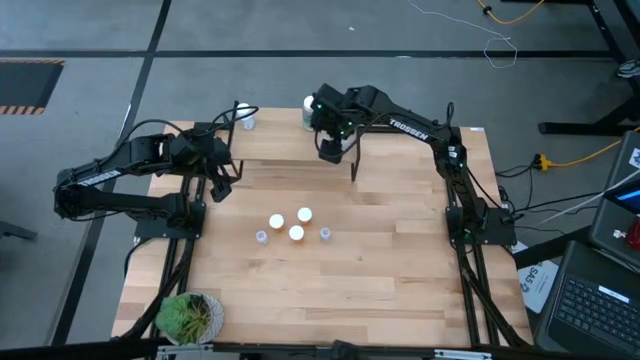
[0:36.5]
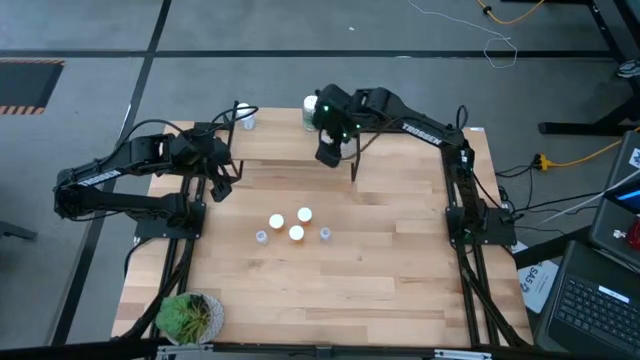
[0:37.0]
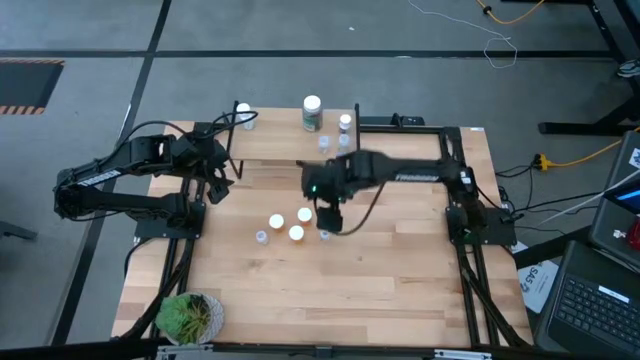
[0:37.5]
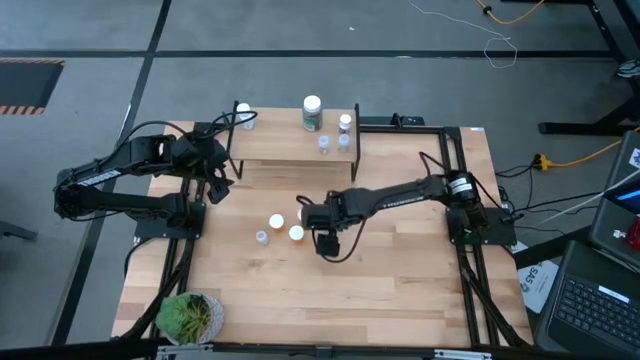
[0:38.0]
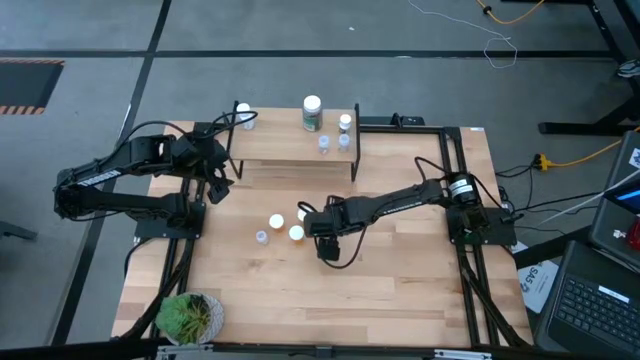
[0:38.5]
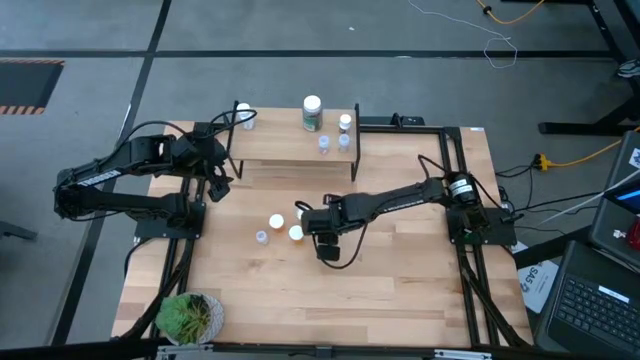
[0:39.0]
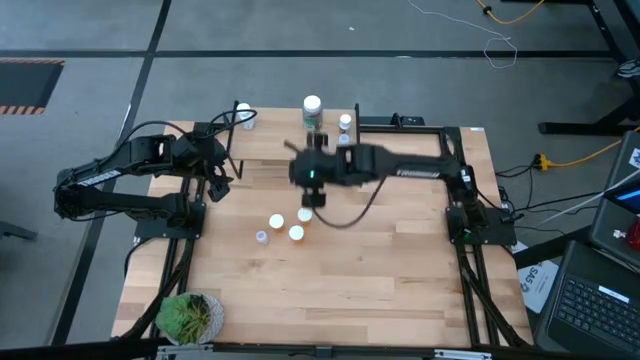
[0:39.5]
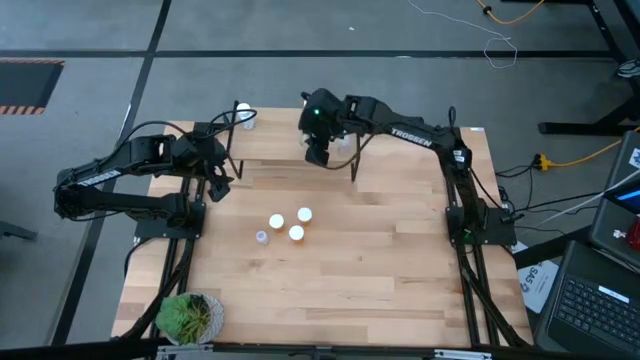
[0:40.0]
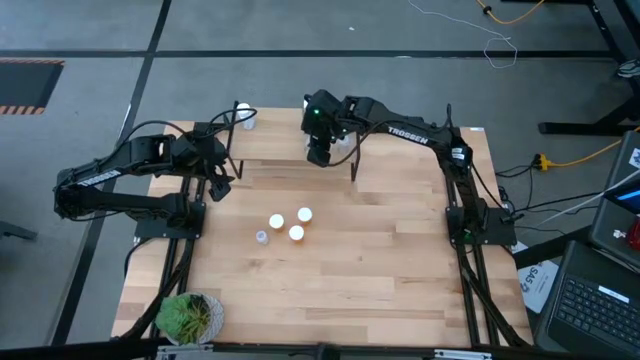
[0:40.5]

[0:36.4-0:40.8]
Task: Pick and place medicine bottles onto shelf by color
Put the transparent pill bottle on the shelf

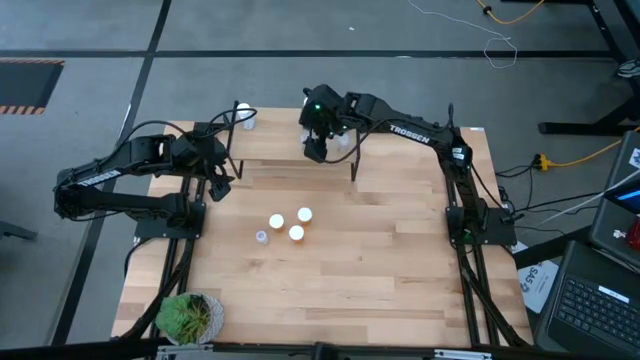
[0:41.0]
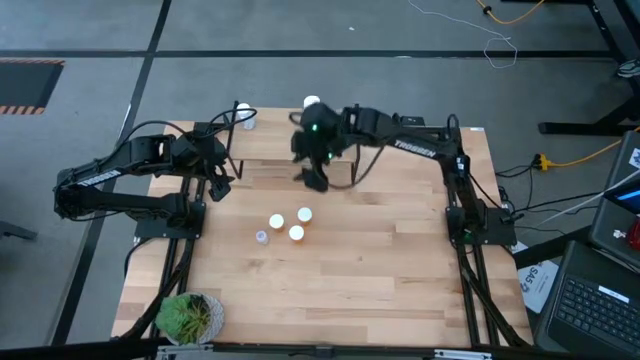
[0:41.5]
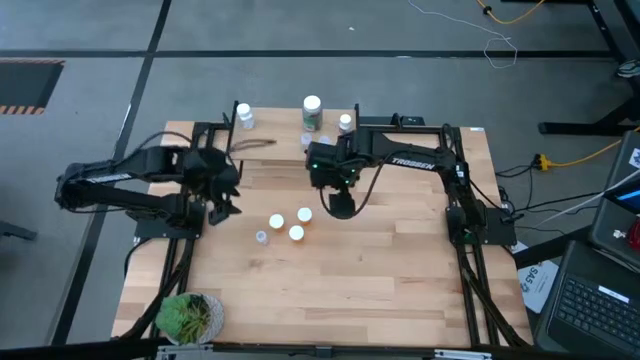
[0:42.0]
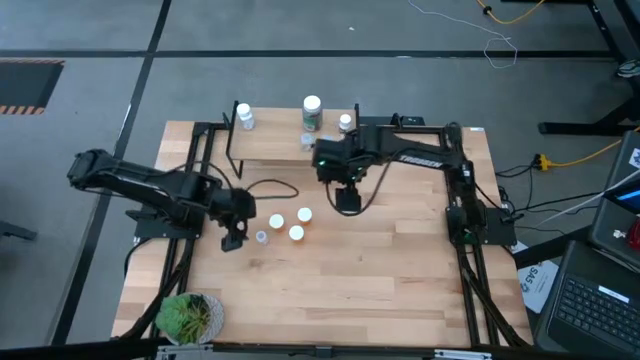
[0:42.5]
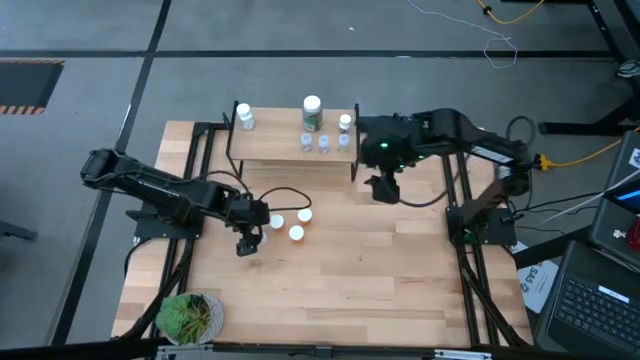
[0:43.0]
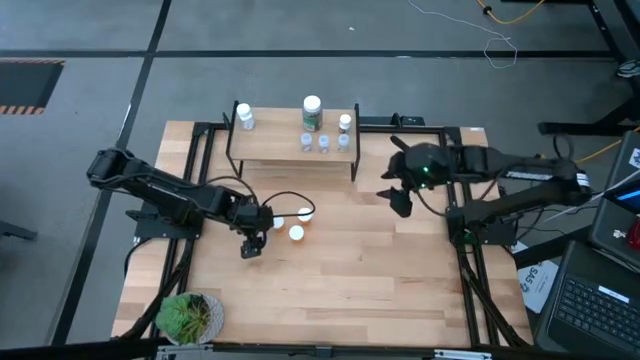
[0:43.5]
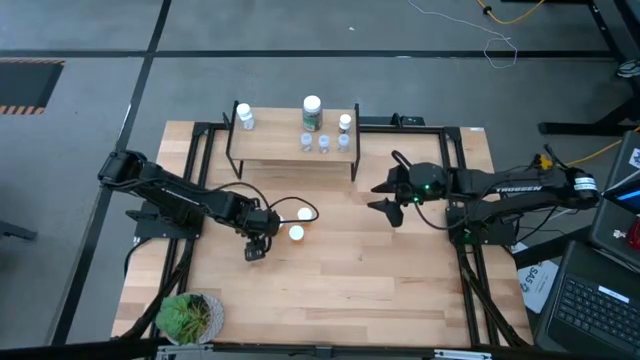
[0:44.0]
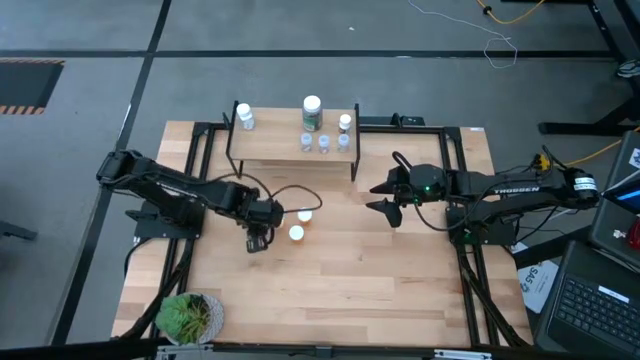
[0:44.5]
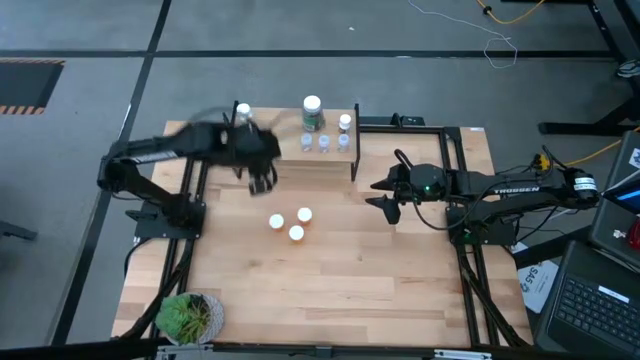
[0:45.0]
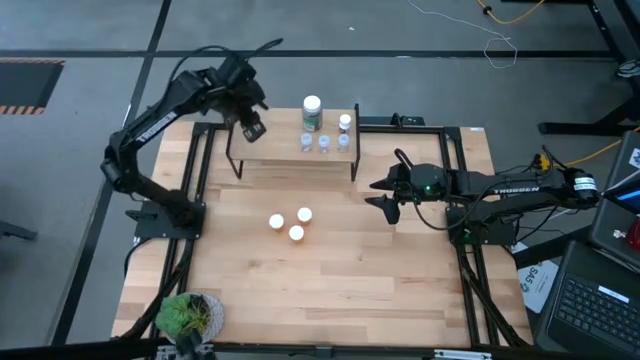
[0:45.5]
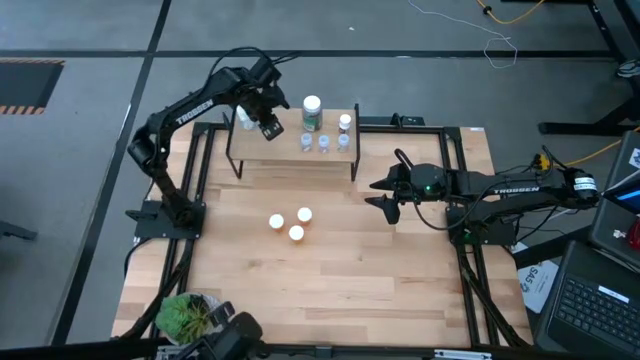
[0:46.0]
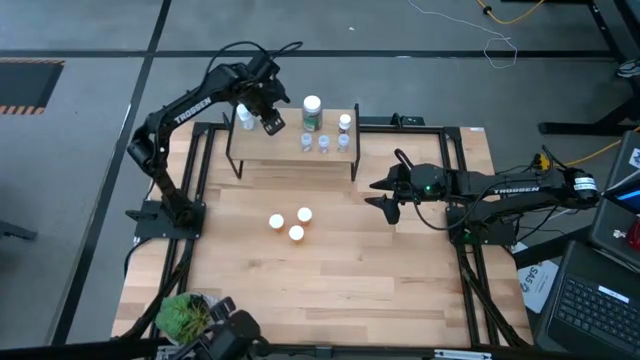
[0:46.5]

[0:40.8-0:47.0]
Put the transparent pill bottle on the shelf

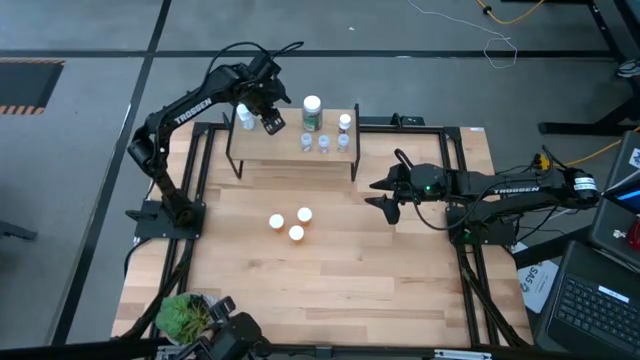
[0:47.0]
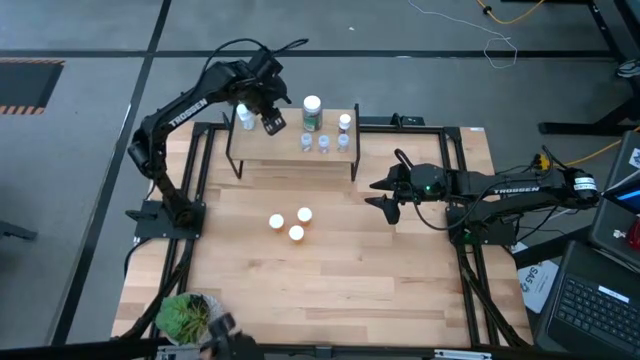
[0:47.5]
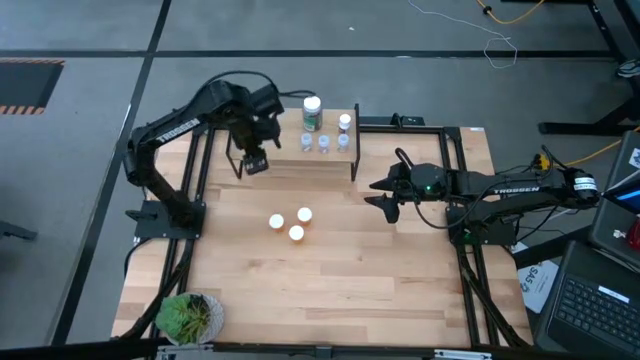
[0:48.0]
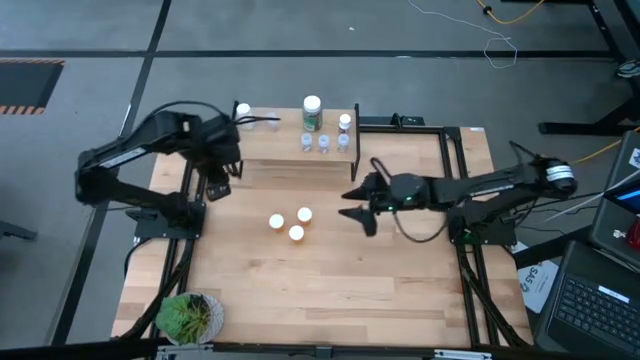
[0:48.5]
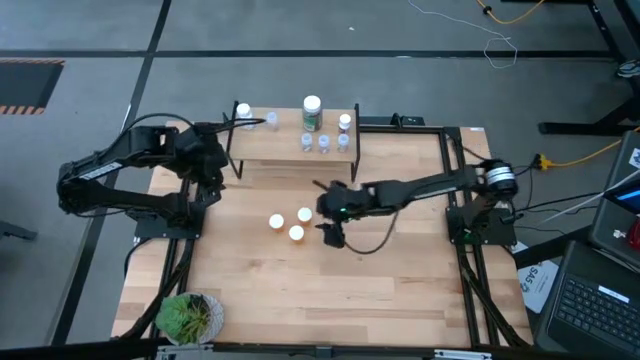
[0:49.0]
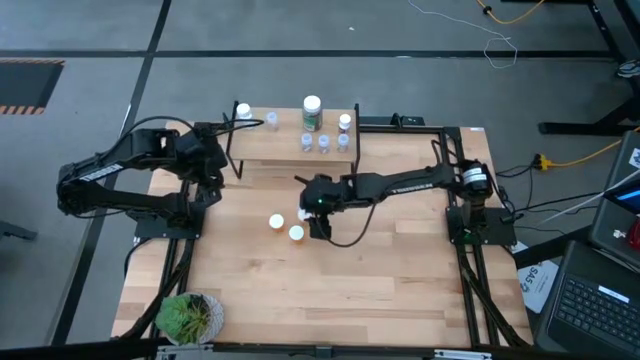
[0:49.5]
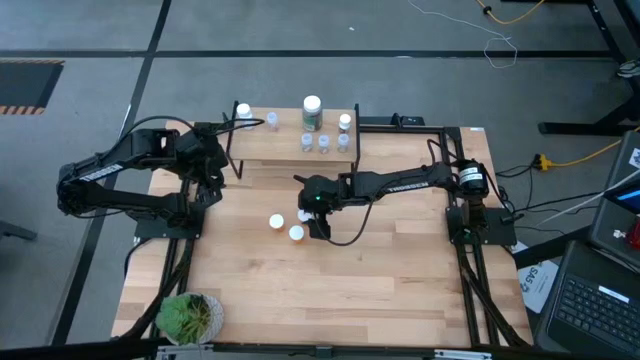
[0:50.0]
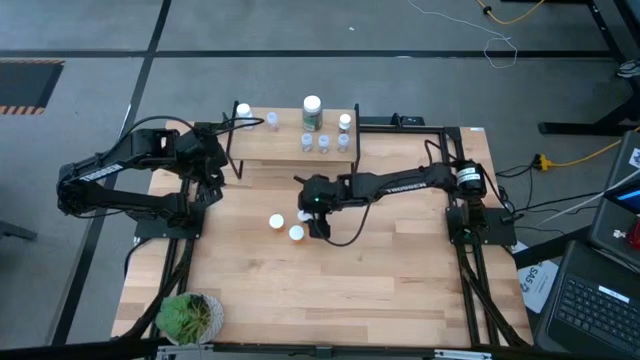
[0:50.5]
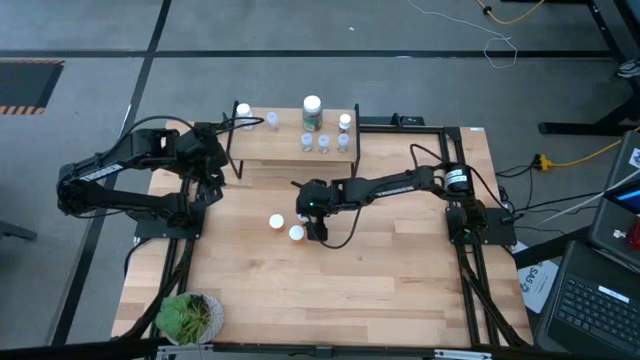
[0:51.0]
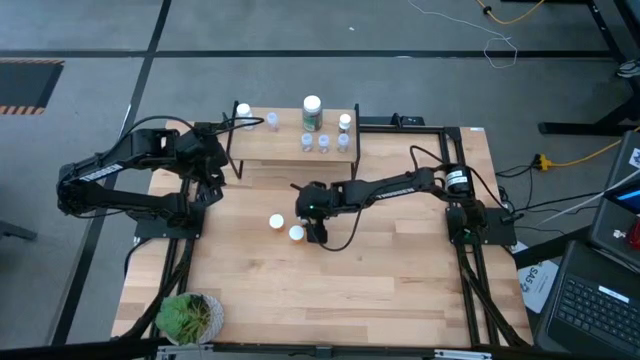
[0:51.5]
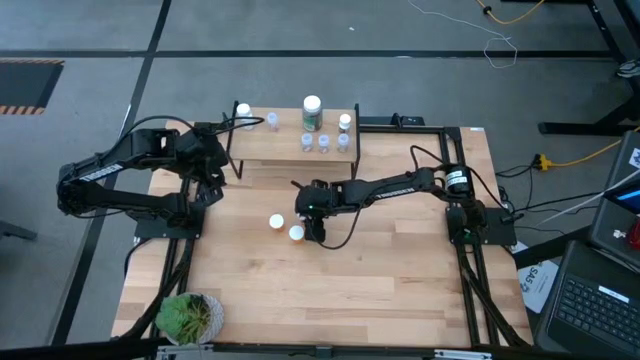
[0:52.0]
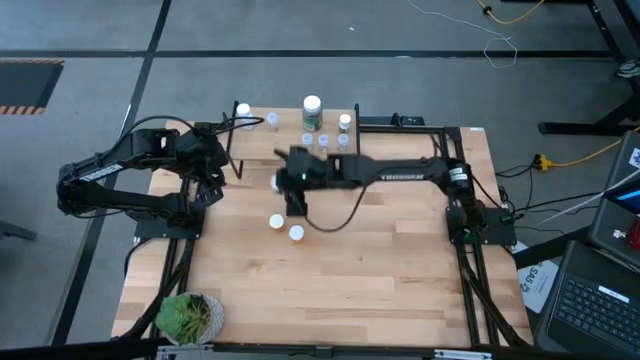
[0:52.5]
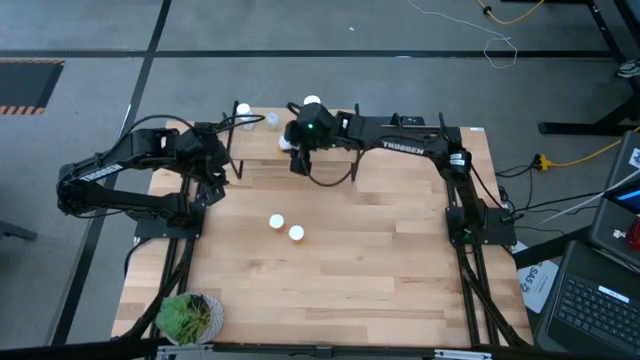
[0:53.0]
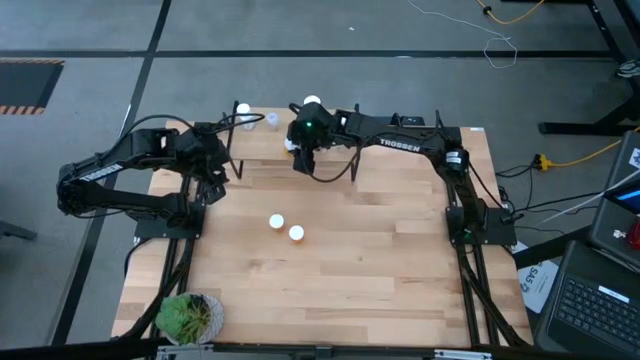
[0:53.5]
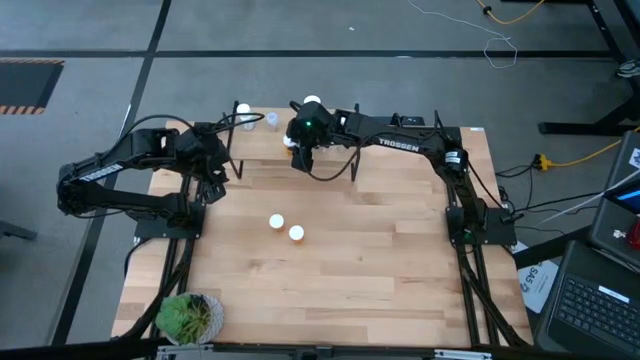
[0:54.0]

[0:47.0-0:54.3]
Put the orange pill bottle on the shelf

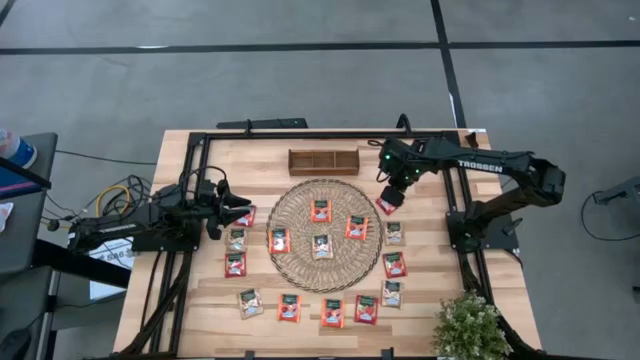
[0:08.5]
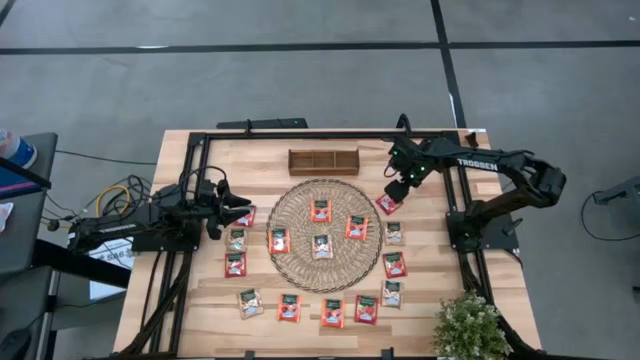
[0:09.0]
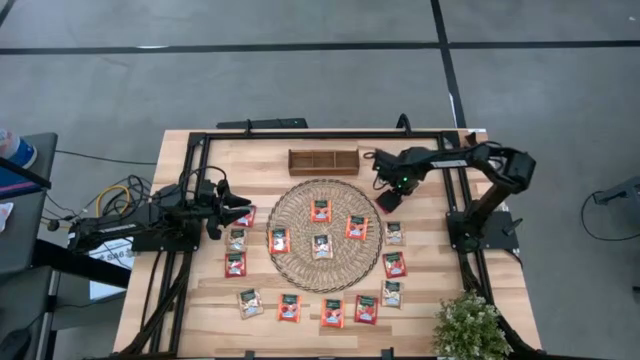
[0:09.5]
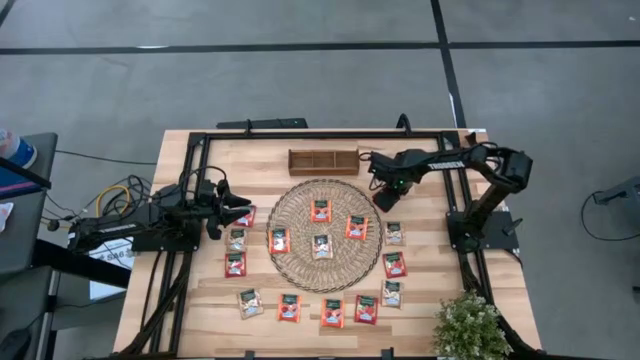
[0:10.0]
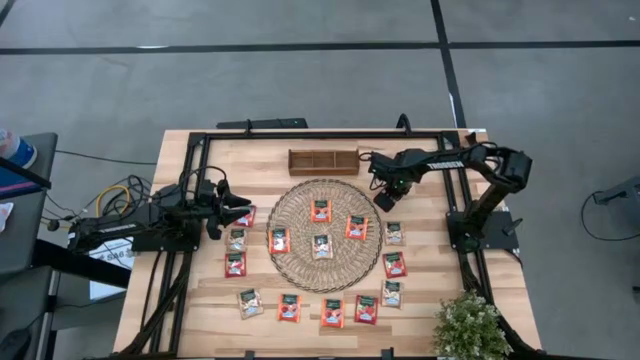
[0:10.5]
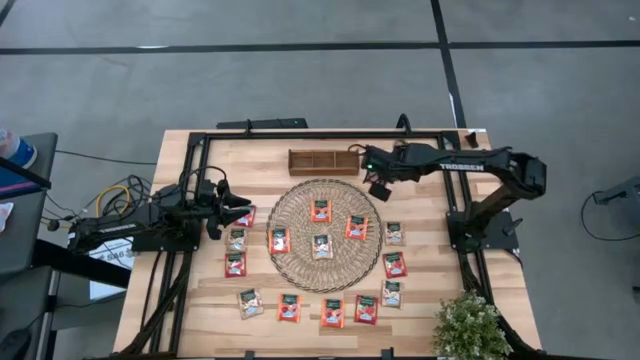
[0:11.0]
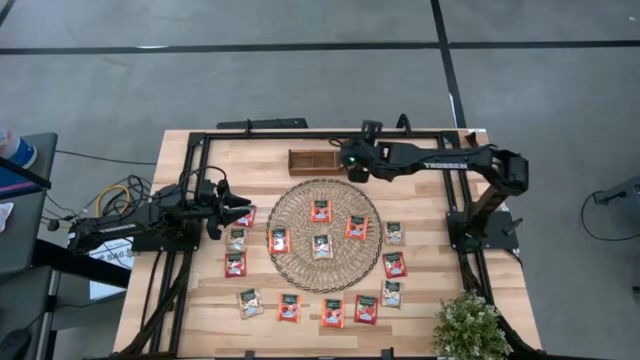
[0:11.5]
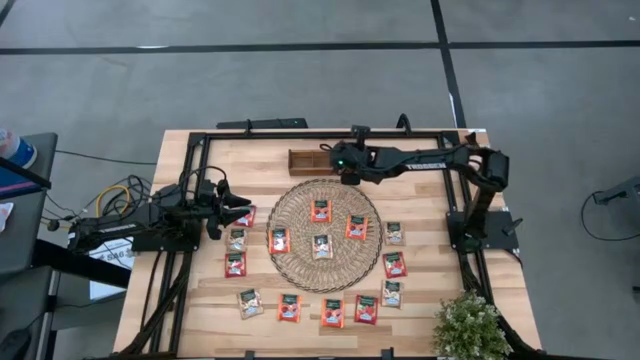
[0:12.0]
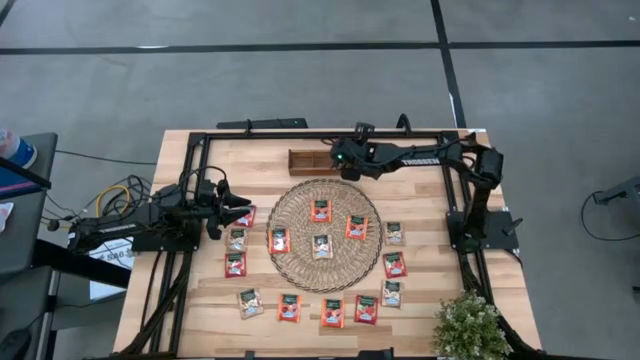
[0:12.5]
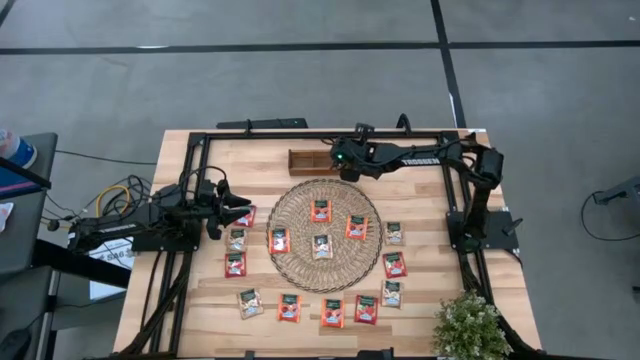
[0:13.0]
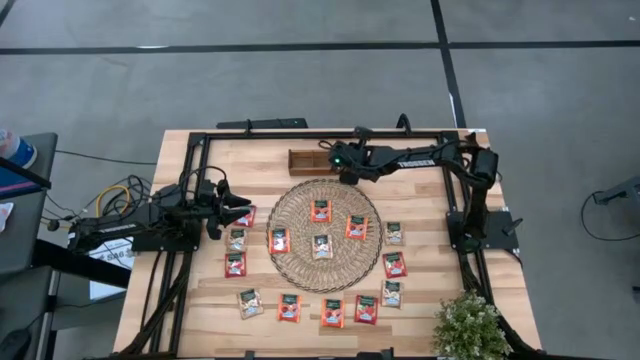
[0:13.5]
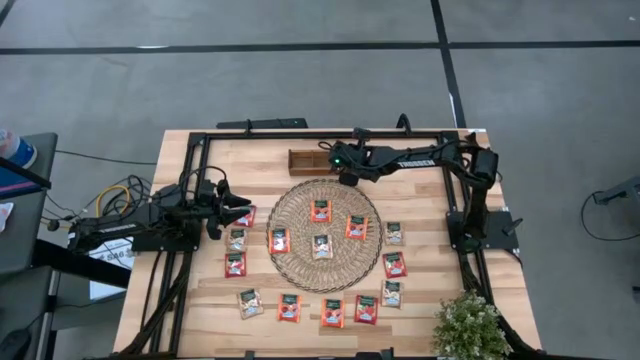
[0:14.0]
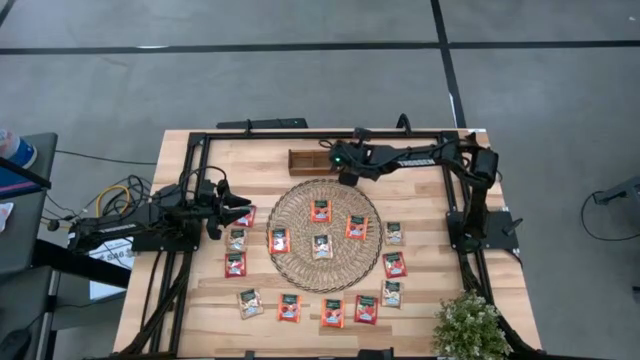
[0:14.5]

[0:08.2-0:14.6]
Task: Pick & Place Tea
Put the red tea bag into the right section of the wooden organizer
